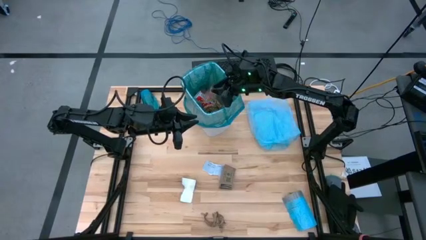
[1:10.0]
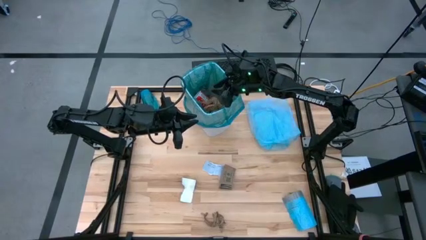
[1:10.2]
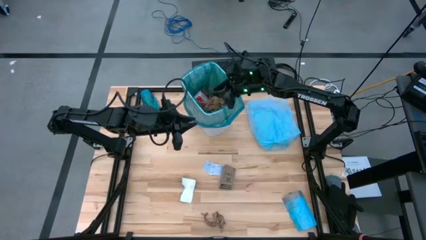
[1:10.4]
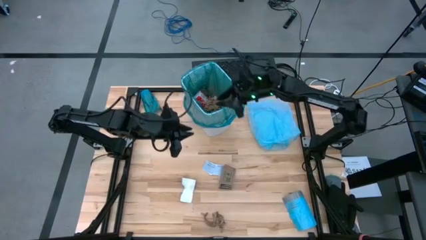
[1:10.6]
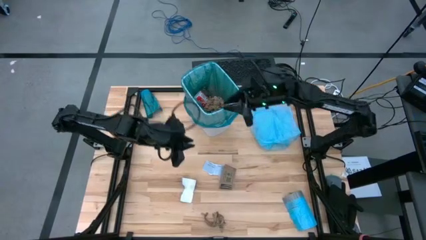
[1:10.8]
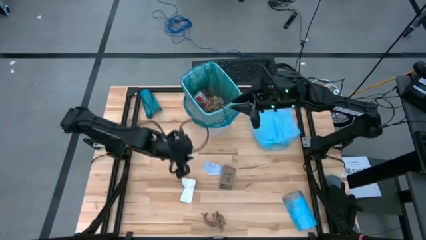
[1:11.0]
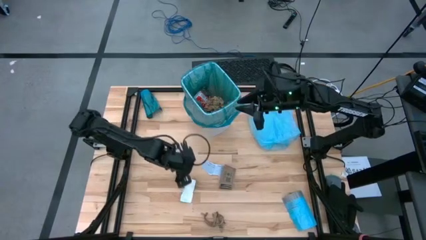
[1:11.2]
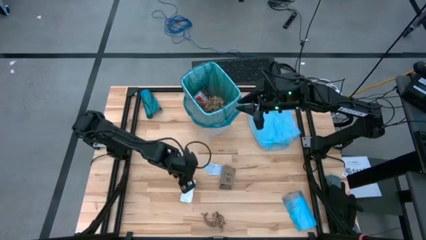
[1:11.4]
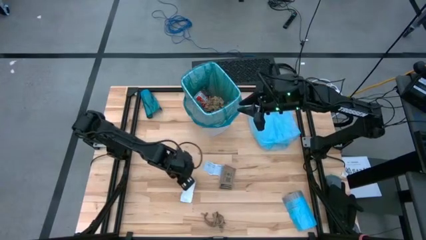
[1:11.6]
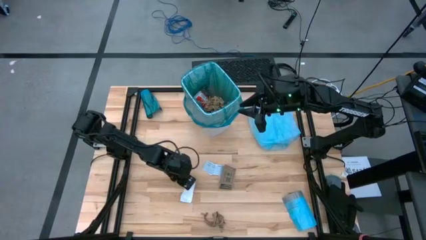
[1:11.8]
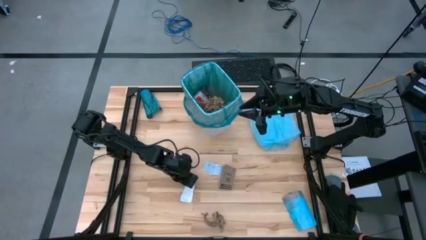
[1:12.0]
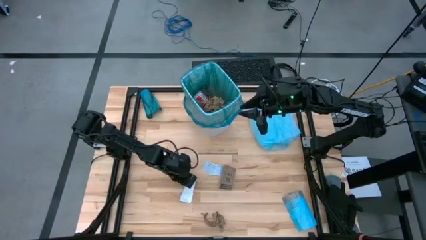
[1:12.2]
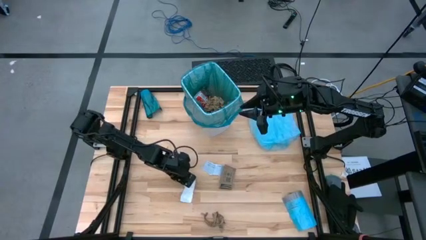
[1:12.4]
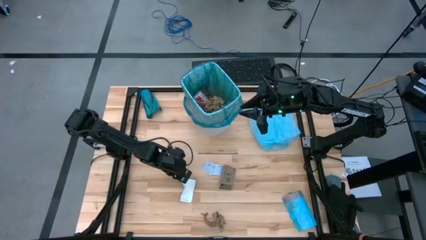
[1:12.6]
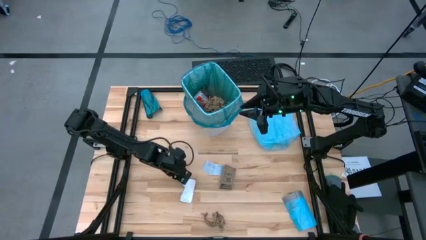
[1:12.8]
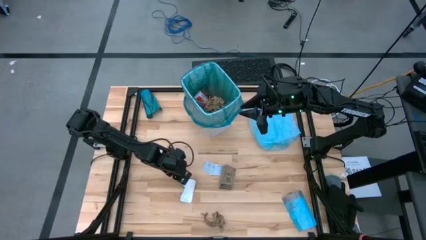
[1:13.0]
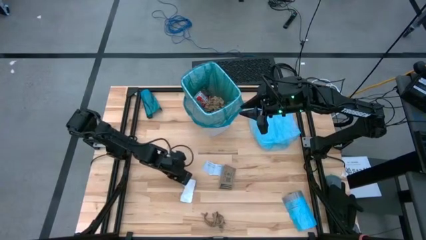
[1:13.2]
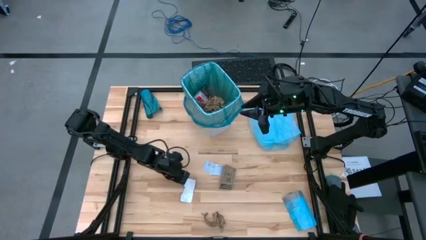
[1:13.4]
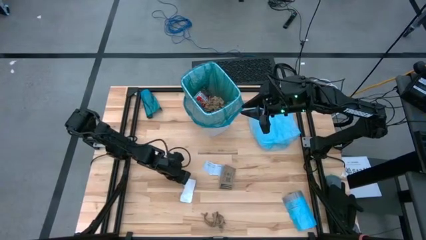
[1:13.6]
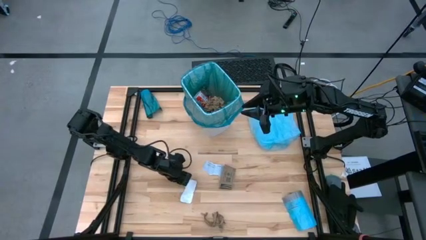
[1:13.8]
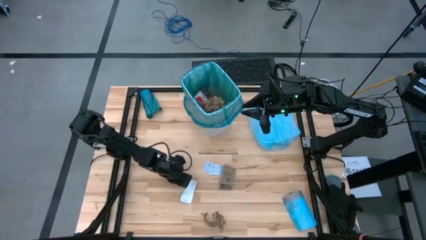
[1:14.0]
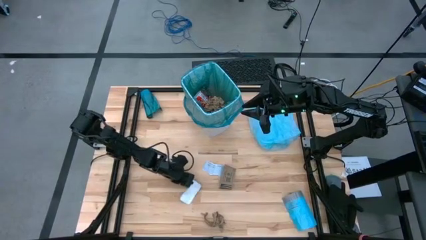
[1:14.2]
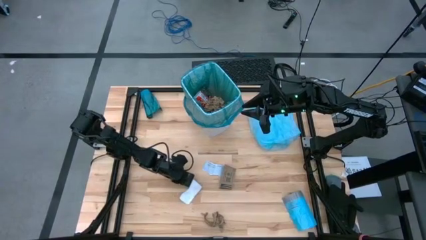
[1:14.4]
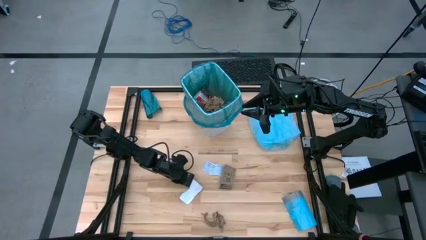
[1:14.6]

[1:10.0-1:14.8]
Task: place trash/remove bag and relplace
Put the white paper into the blue trash bag inside the white trash bin

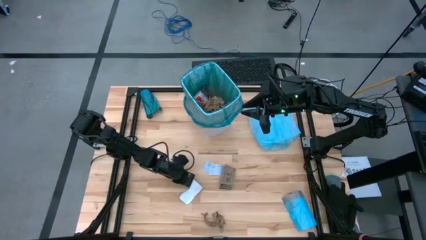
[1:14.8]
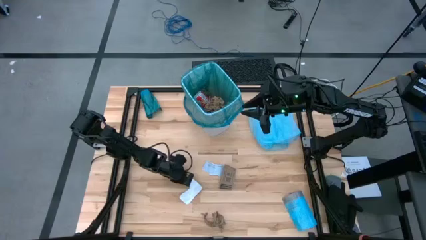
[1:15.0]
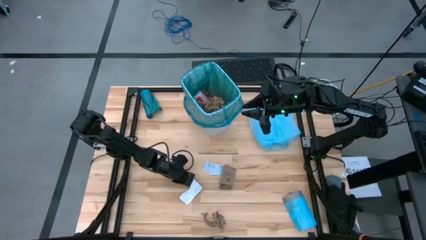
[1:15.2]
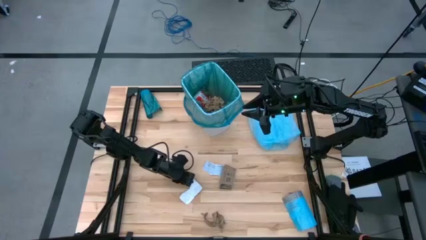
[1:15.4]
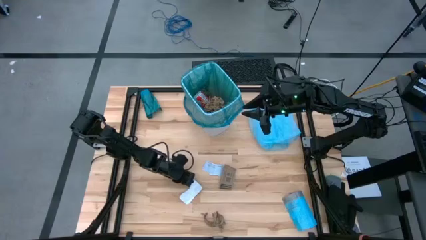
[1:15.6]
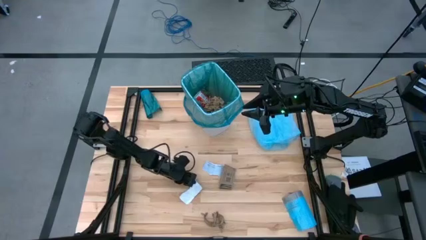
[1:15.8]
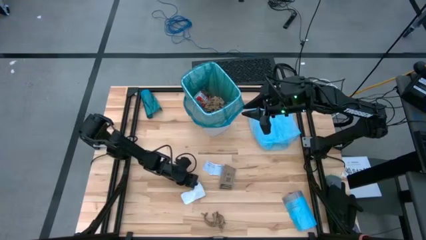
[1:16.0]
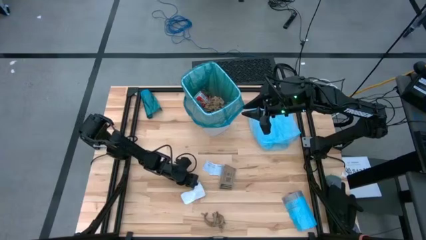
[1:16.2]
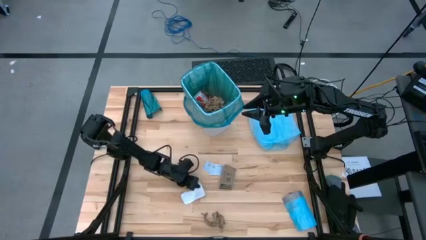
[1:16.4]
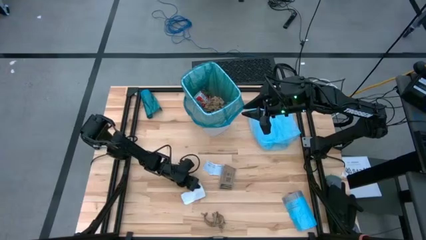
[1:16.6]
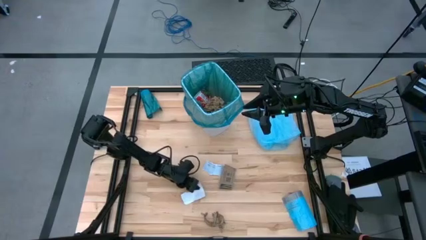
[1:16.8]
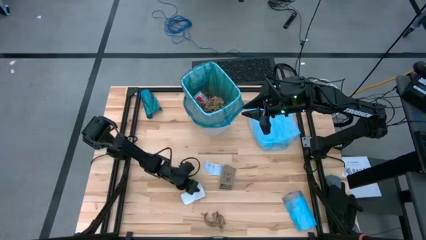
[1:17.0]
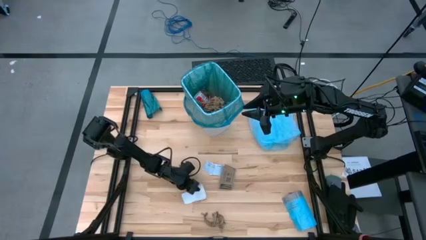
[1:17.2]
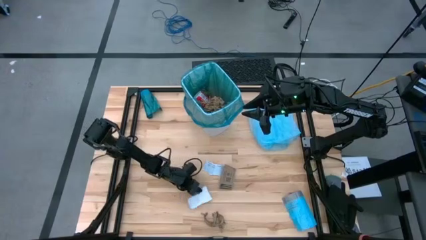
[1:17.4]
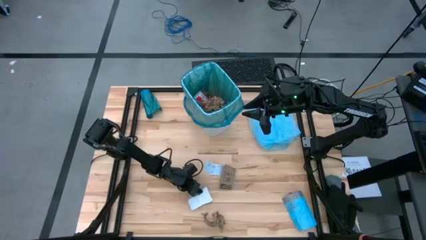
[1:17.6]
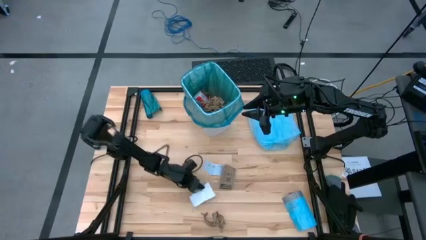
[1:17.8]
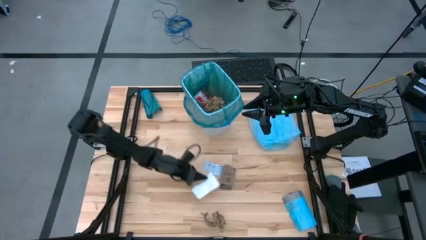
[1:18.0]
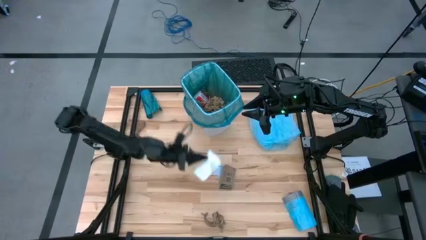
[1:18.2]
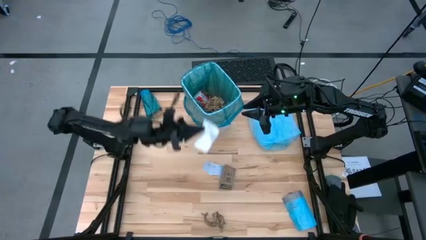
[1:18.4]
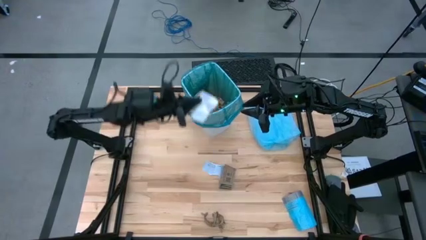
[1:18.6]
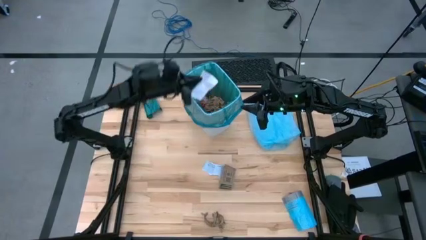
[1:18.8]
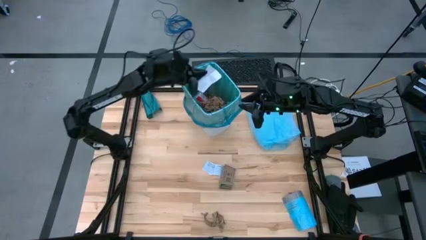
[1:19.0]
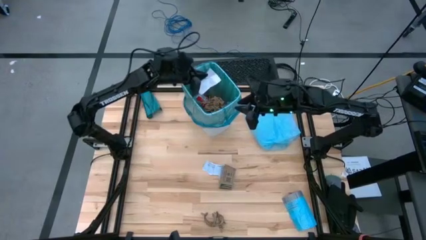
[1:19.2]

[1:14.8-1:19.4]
Put the white paper into the blue trash bag inside the white trash bin

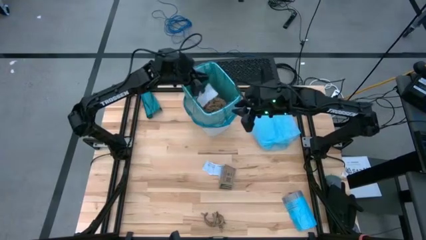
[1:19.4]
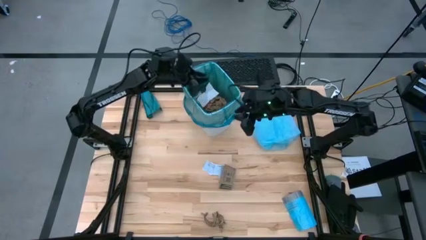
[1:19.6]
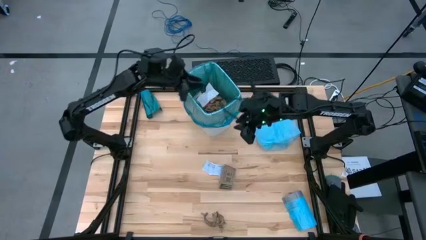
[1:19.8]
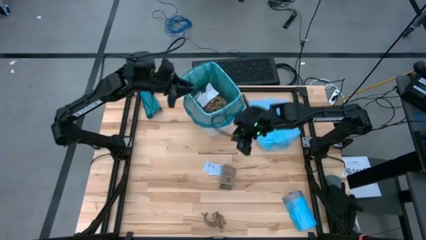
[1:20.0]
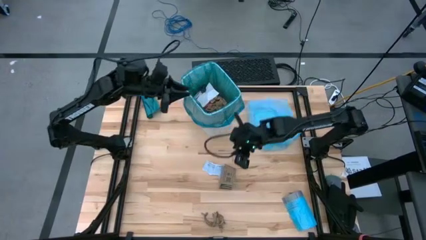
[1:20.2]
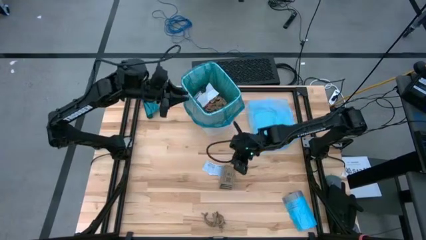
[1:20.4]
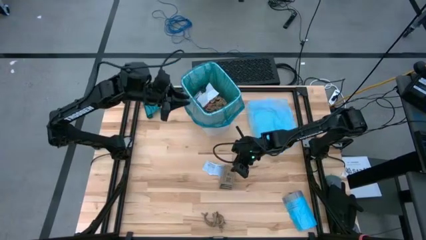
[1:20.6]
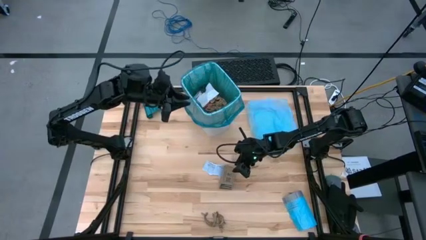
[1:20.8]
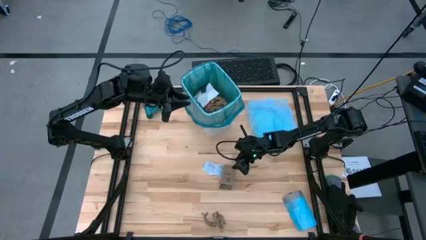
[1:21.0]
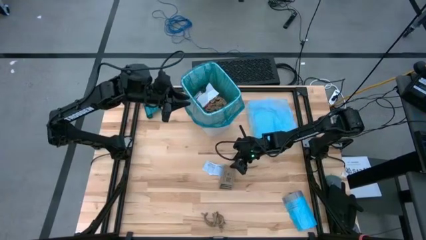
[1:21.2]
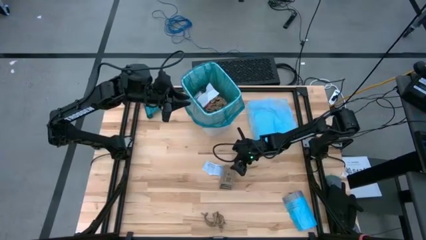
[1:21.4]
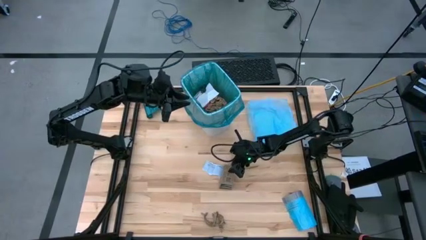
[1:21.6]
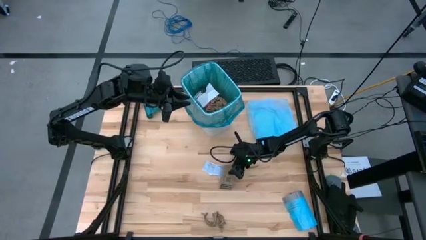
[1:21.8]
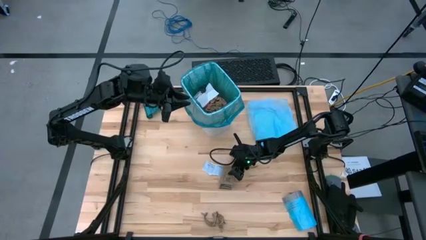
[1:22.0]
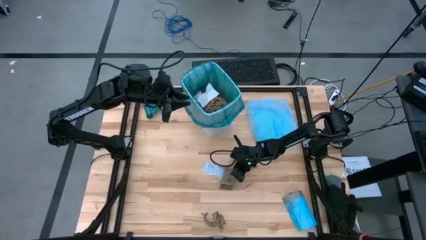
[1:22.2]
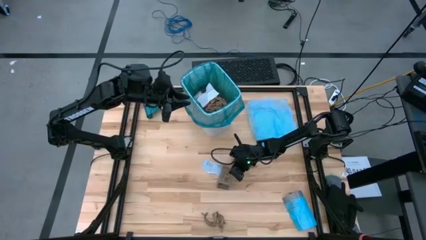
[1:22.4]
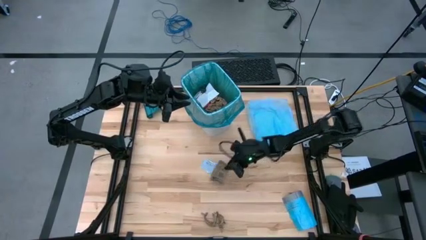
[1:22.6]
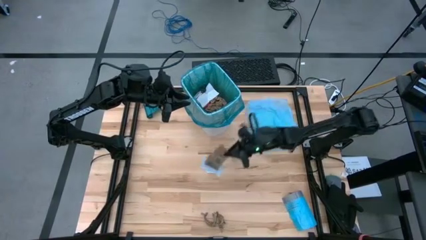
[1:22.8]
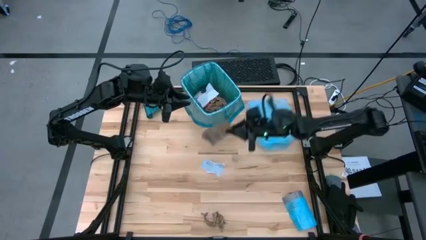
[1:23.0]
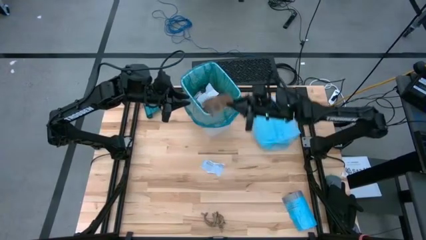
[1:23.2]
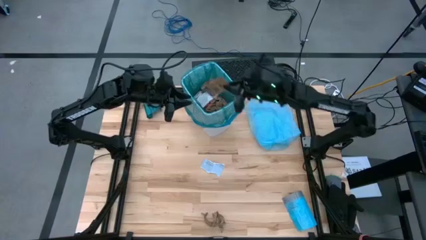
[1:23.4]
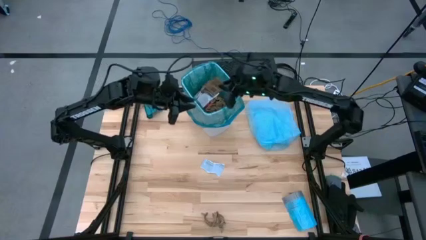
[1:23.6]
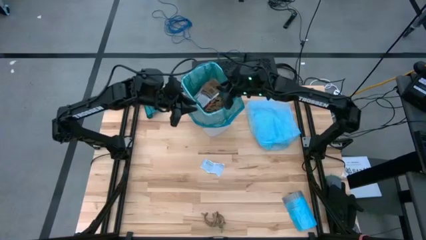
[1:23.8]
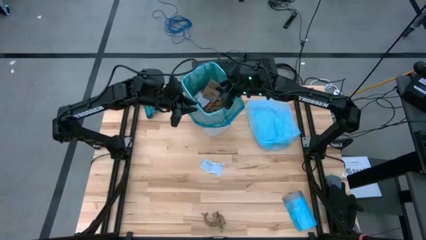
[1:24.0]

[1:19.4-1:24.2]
Put the brown paper into the blue trash bag inside the white trash bin

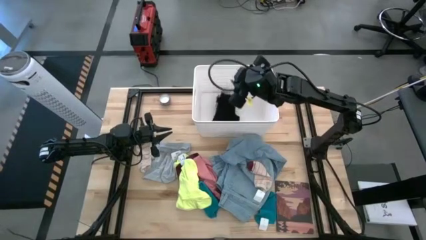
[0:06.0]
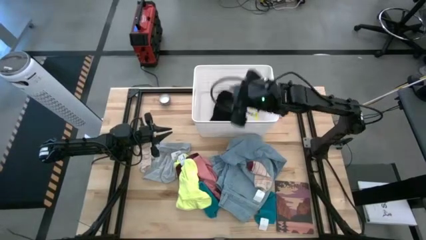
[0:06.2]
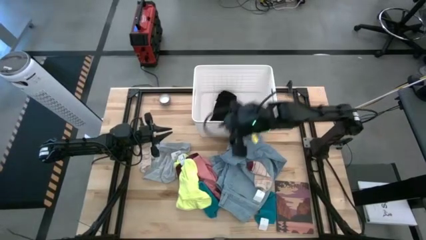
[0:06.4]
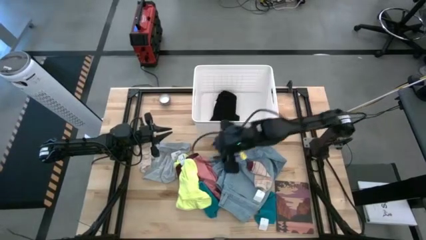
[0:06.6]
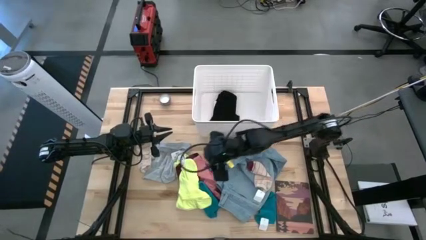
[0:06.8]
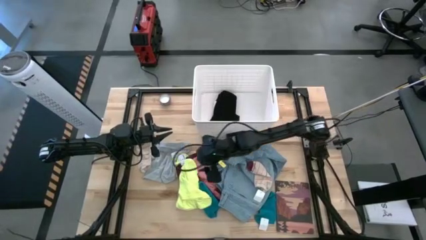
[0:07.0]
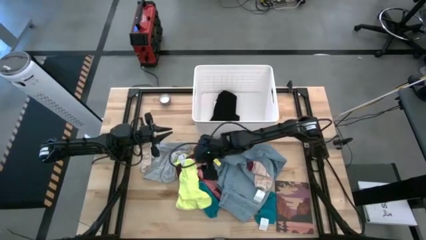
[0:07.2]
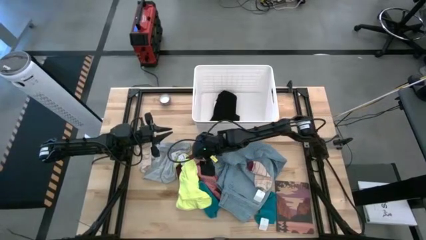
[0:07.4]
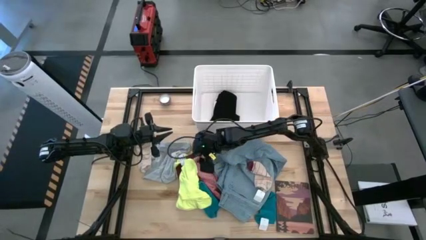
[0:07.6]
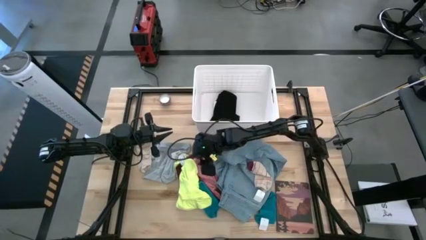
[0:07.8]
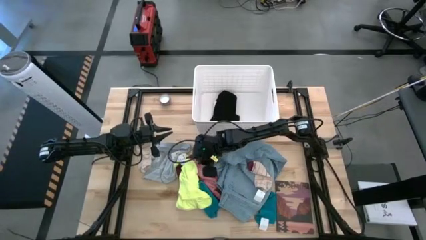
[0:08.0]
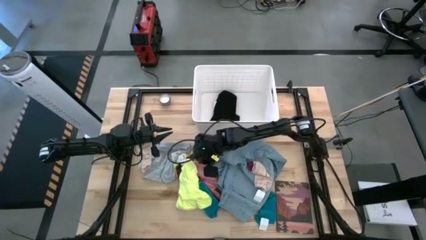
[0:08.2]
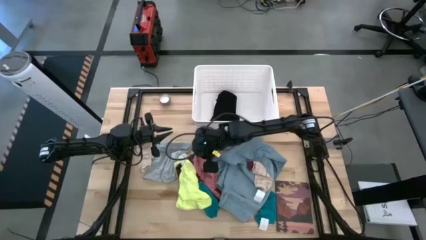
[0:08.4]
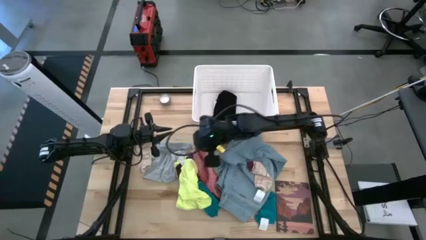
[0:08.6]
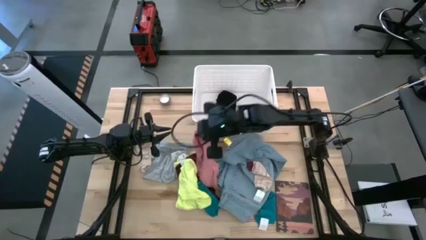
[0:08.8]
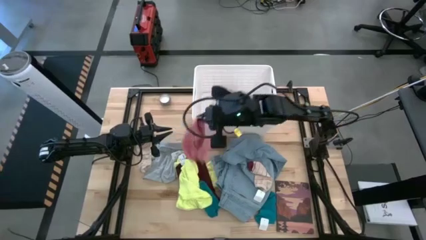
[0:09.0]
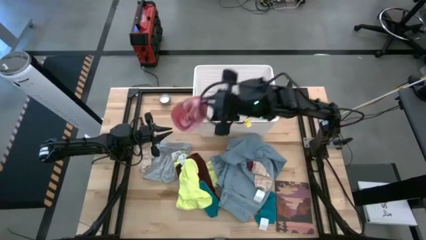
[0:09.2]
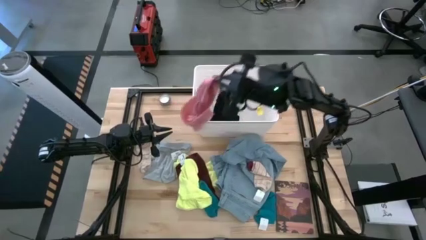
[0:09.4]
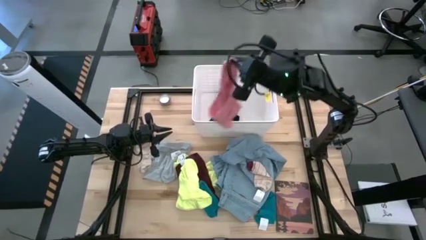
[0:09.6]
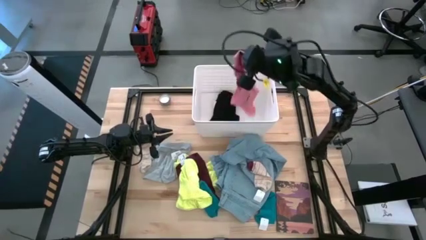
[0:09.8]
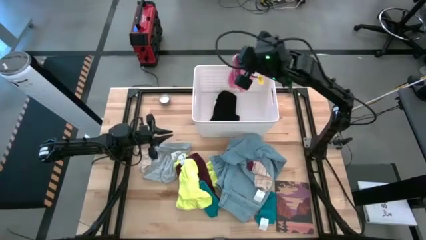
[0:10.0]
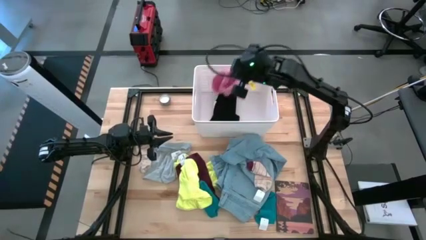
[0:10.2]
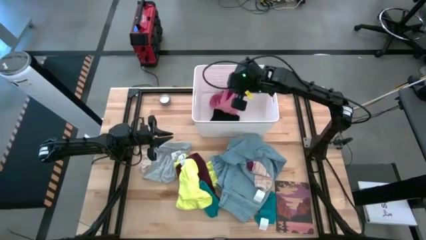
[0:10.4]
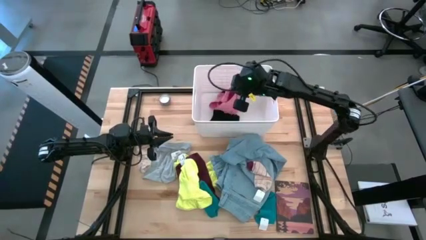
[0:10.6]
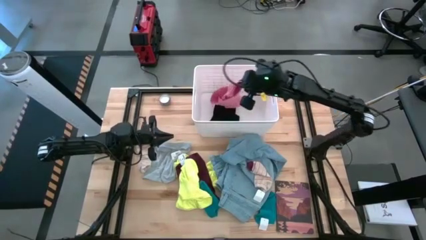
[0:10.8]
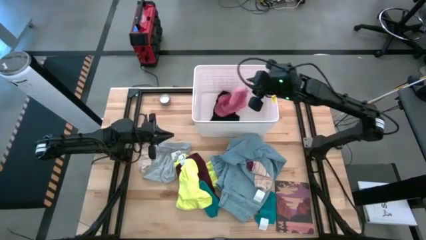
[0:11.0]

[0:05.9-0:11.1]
Task: Sort clothes
Put the pink underwear into the white bin
